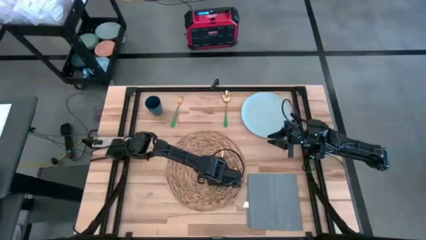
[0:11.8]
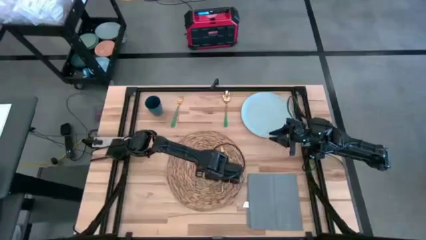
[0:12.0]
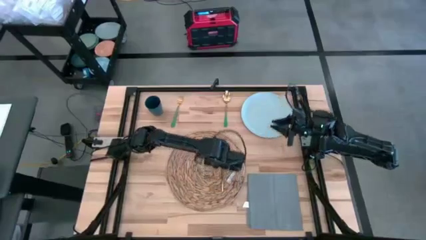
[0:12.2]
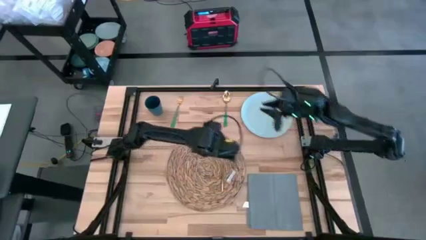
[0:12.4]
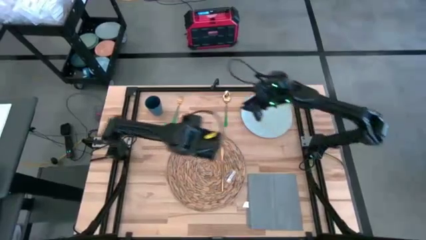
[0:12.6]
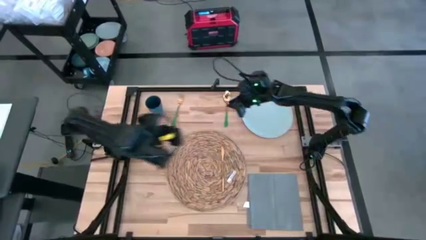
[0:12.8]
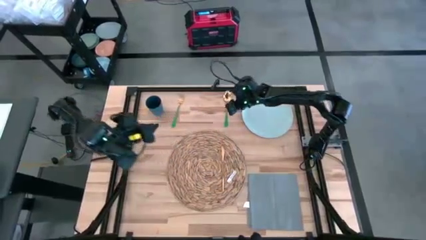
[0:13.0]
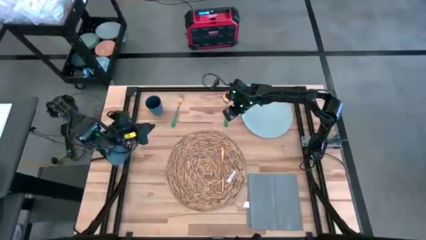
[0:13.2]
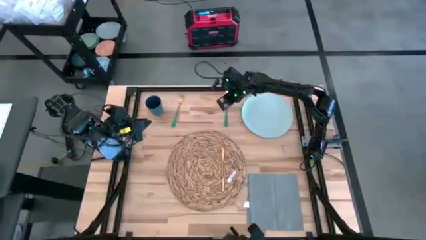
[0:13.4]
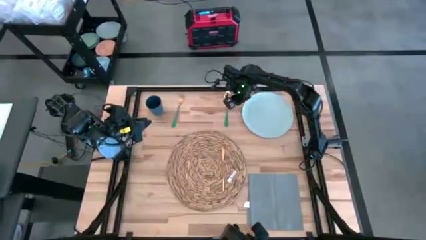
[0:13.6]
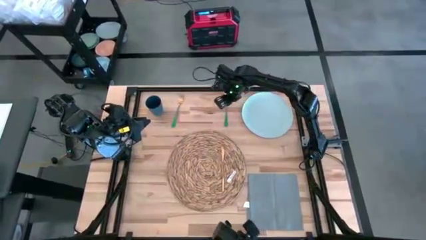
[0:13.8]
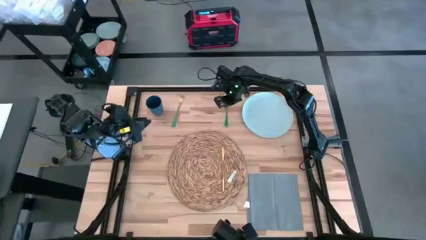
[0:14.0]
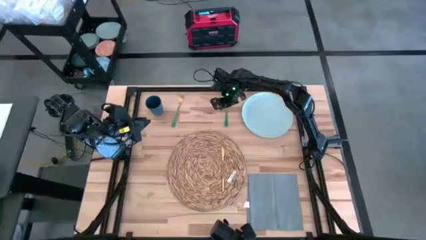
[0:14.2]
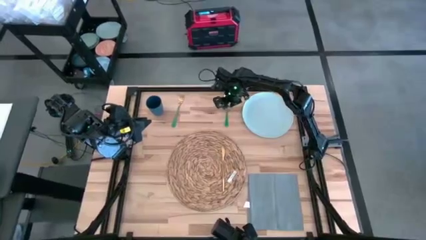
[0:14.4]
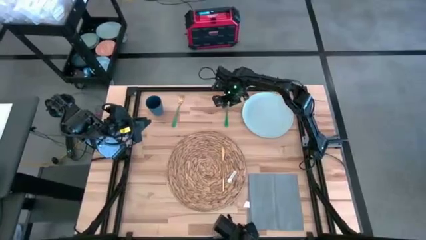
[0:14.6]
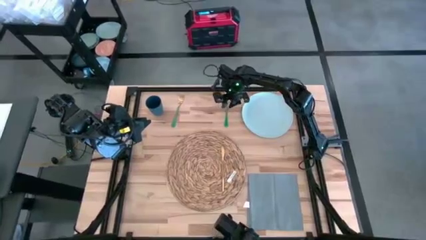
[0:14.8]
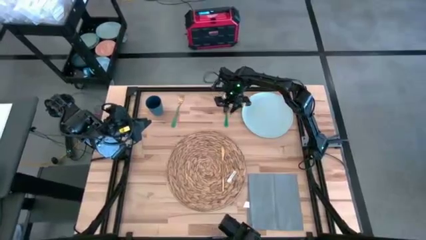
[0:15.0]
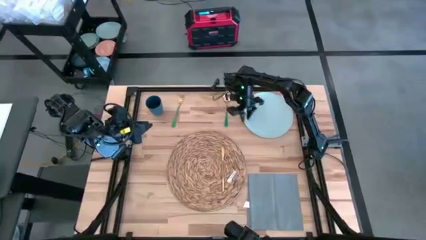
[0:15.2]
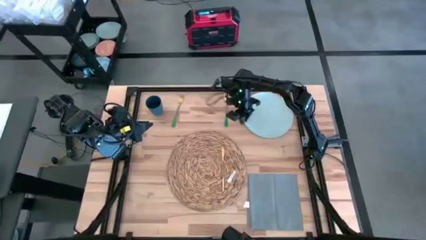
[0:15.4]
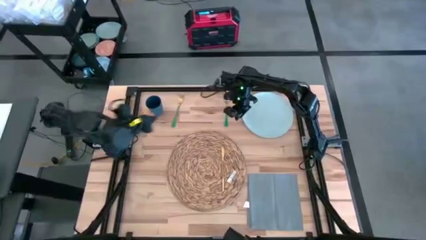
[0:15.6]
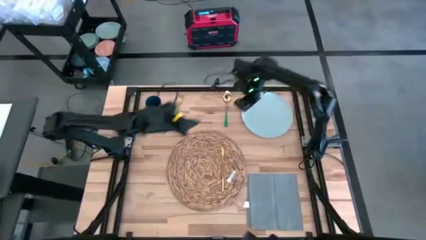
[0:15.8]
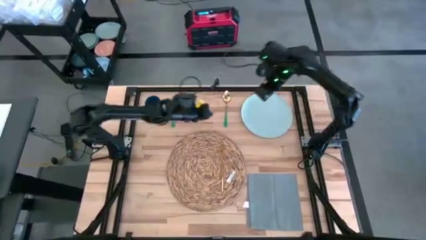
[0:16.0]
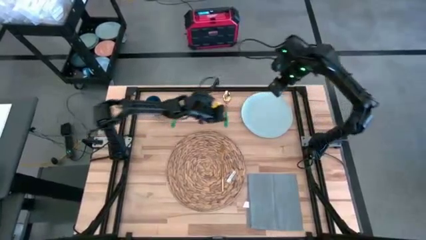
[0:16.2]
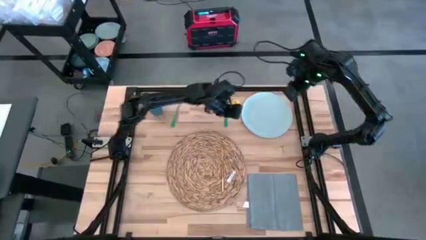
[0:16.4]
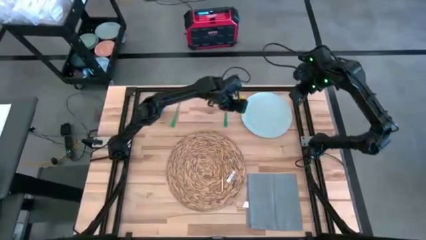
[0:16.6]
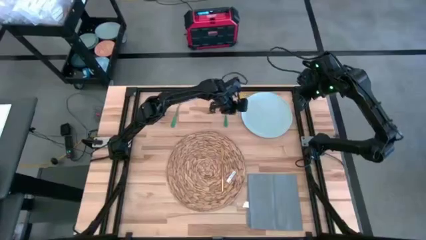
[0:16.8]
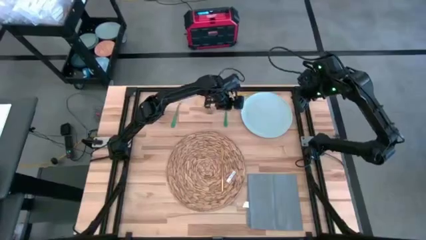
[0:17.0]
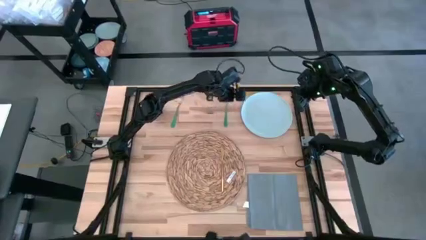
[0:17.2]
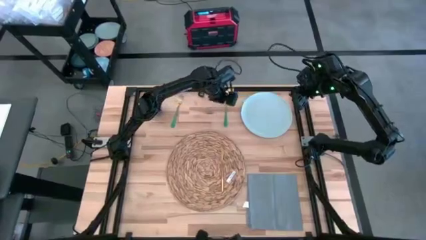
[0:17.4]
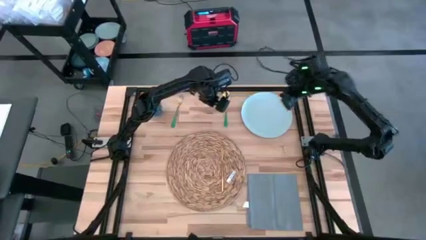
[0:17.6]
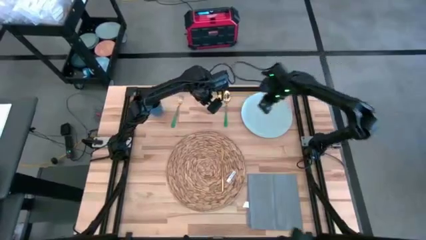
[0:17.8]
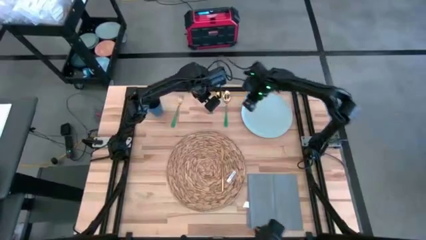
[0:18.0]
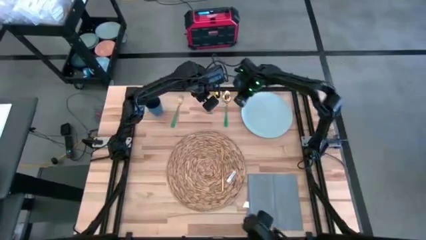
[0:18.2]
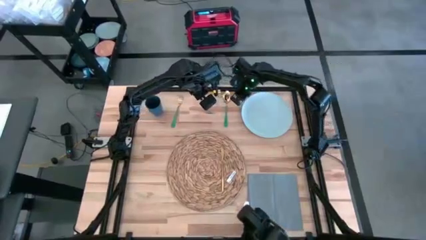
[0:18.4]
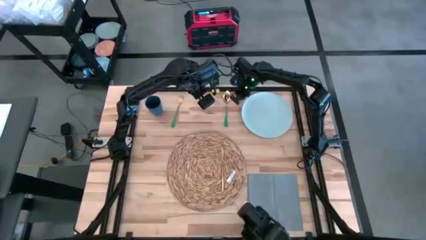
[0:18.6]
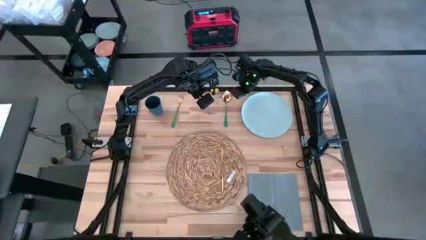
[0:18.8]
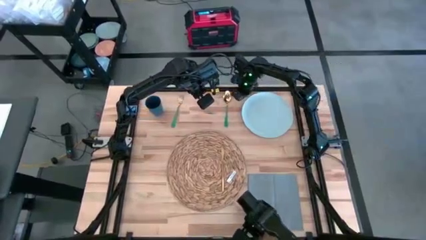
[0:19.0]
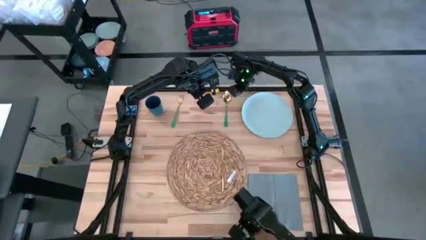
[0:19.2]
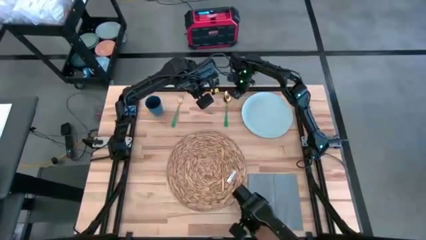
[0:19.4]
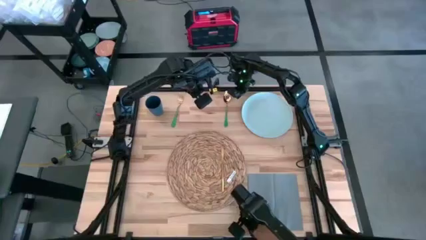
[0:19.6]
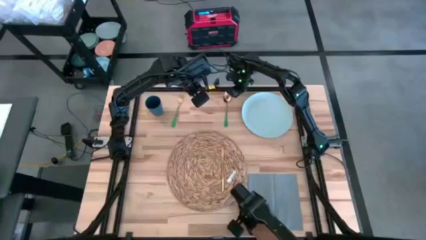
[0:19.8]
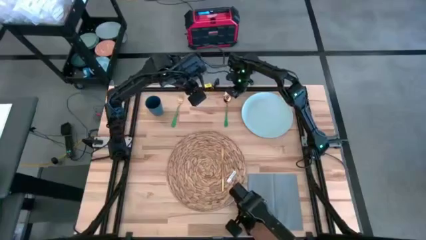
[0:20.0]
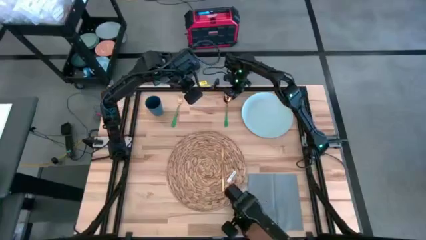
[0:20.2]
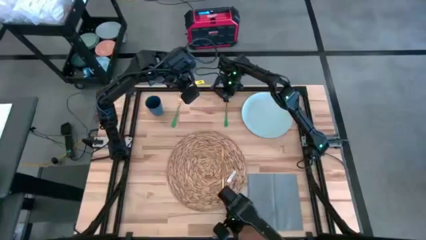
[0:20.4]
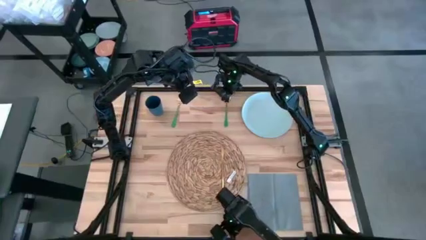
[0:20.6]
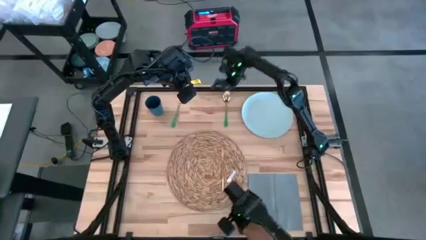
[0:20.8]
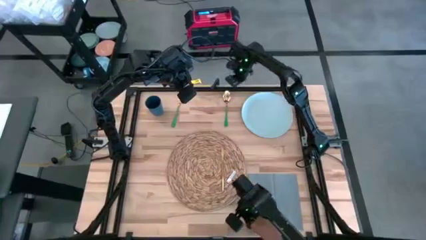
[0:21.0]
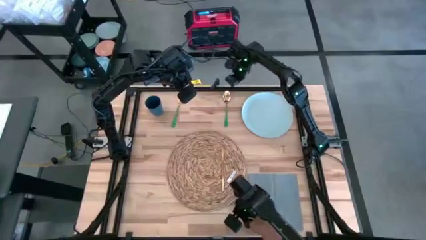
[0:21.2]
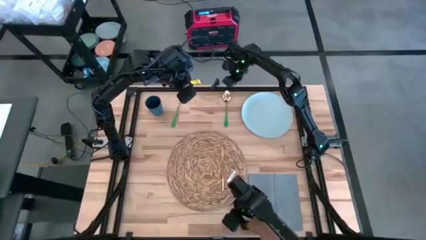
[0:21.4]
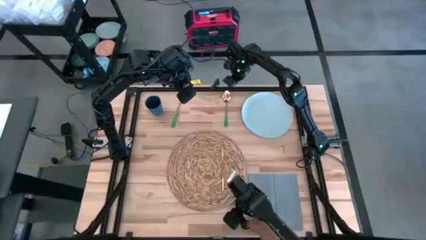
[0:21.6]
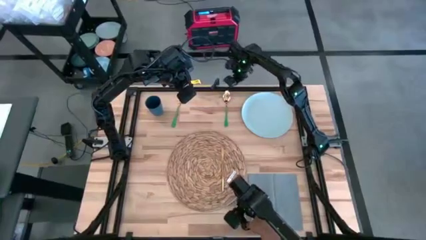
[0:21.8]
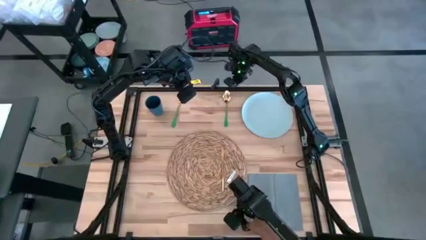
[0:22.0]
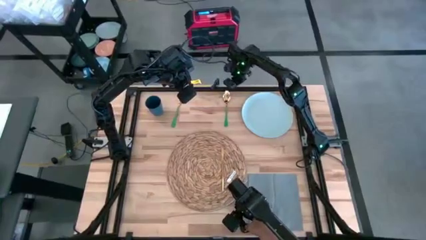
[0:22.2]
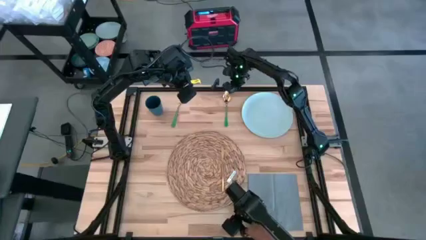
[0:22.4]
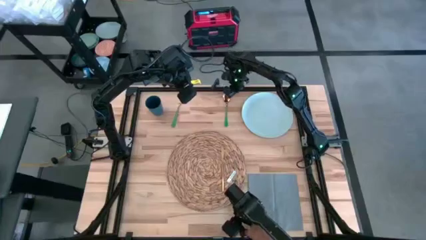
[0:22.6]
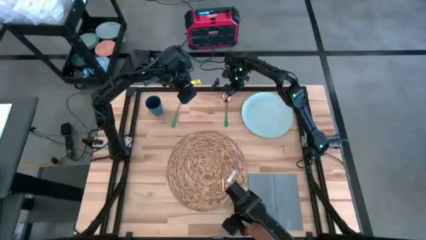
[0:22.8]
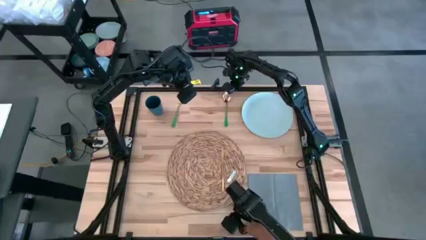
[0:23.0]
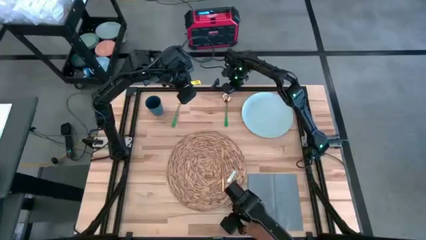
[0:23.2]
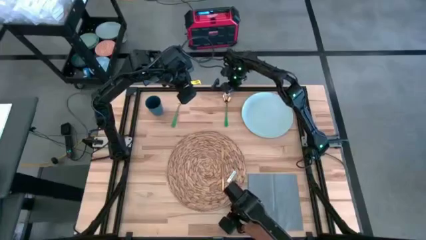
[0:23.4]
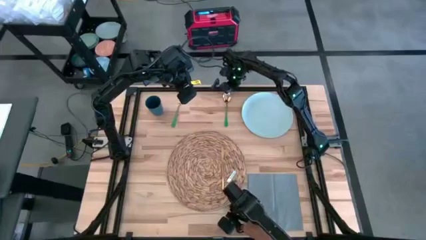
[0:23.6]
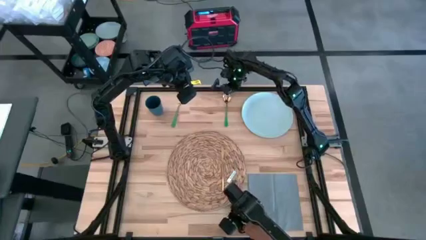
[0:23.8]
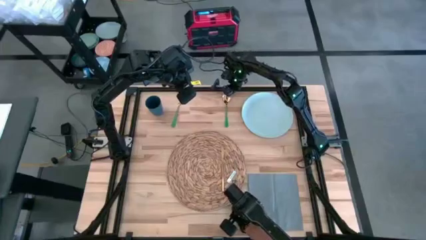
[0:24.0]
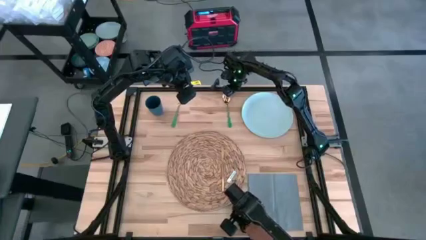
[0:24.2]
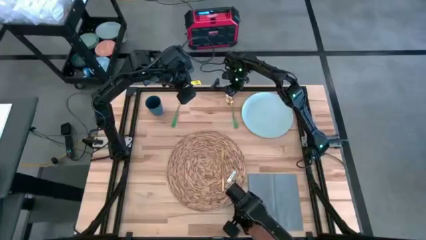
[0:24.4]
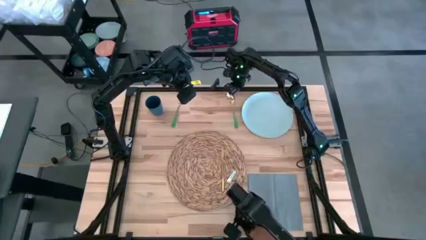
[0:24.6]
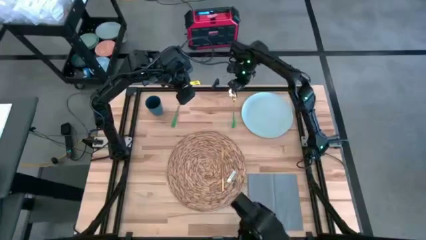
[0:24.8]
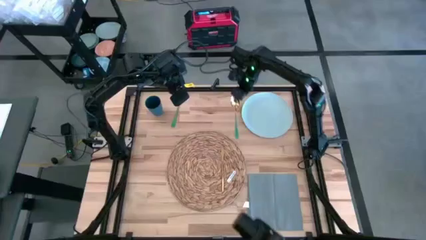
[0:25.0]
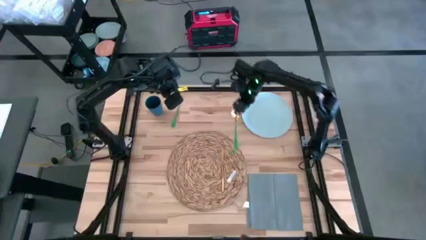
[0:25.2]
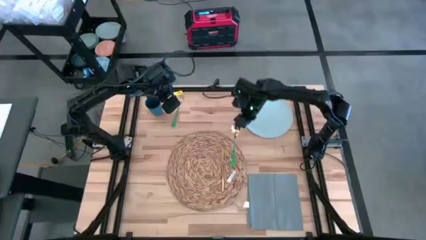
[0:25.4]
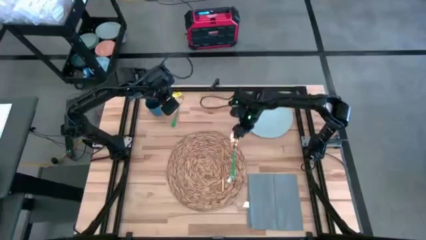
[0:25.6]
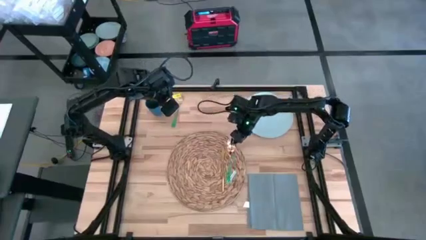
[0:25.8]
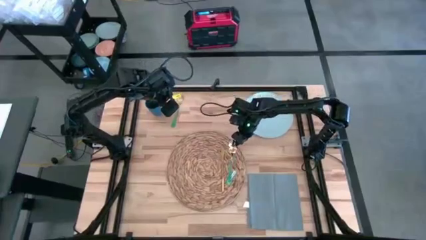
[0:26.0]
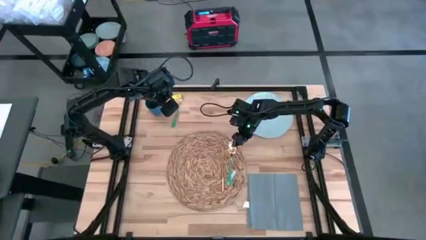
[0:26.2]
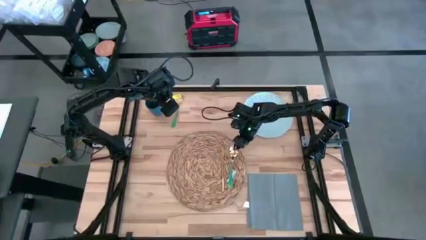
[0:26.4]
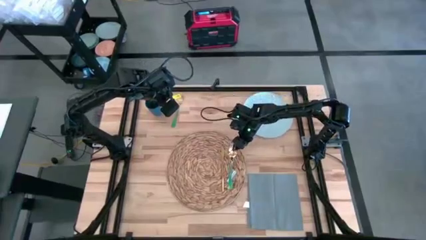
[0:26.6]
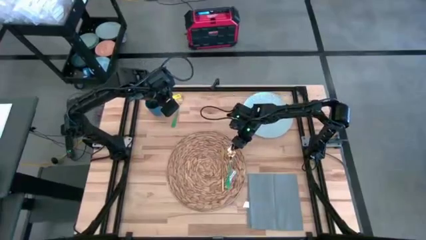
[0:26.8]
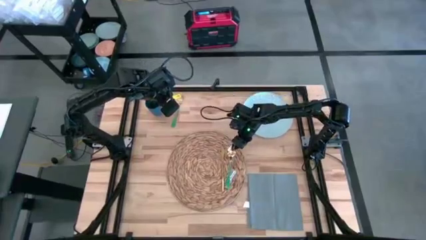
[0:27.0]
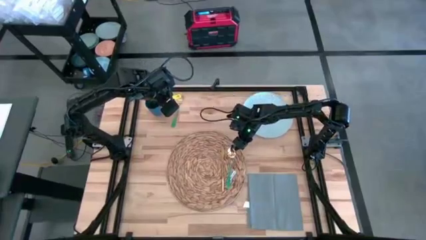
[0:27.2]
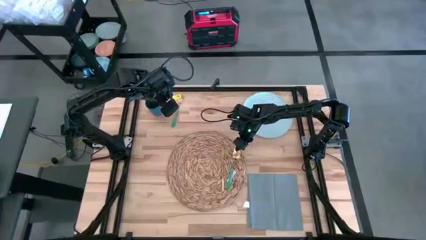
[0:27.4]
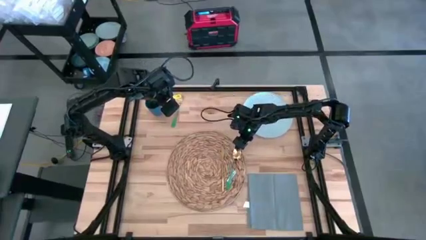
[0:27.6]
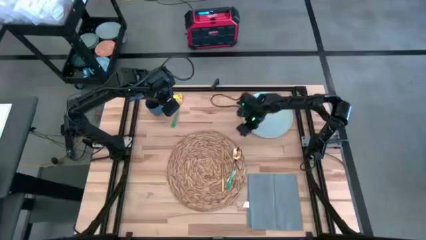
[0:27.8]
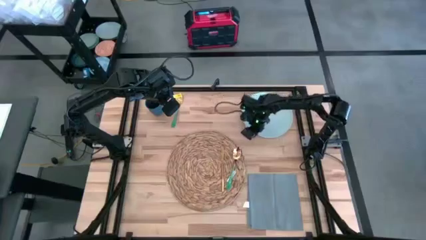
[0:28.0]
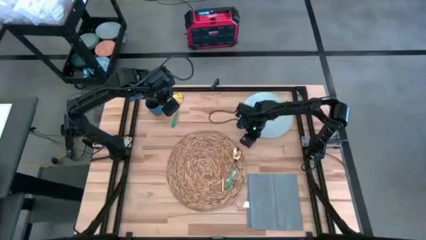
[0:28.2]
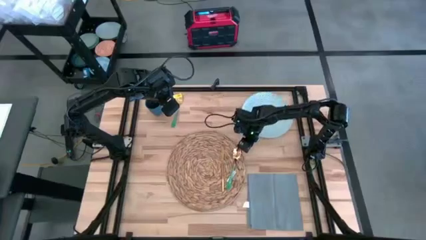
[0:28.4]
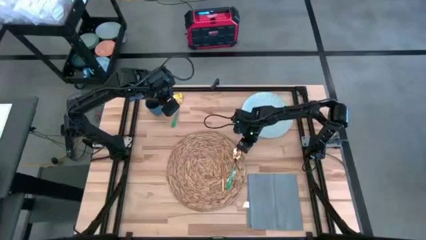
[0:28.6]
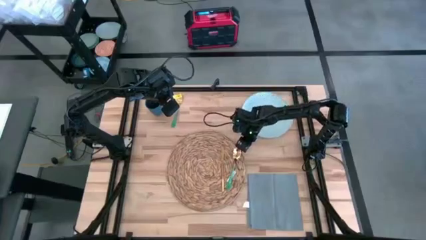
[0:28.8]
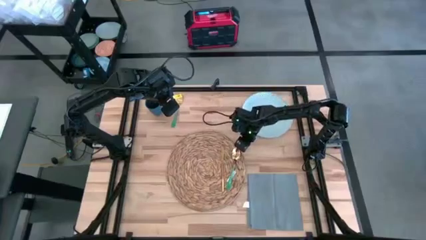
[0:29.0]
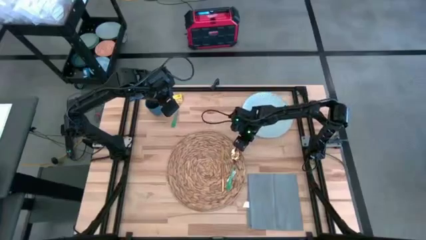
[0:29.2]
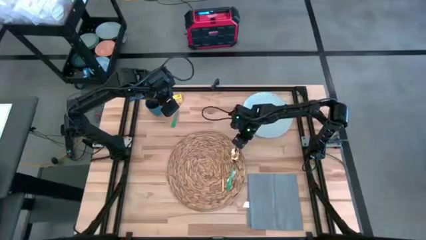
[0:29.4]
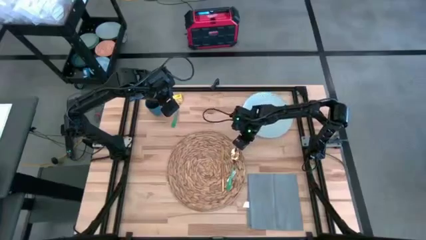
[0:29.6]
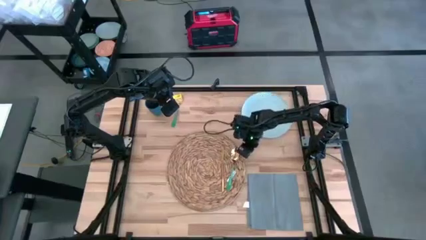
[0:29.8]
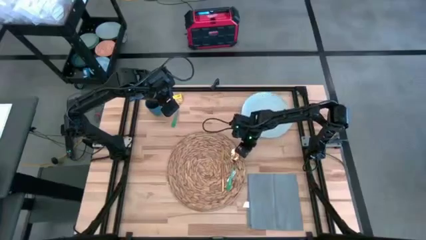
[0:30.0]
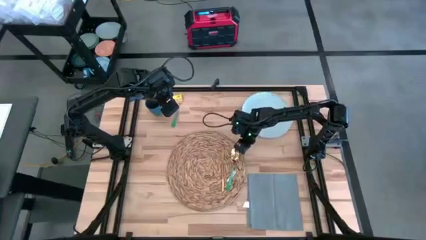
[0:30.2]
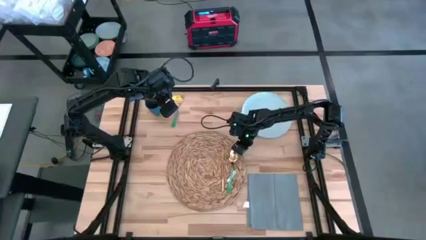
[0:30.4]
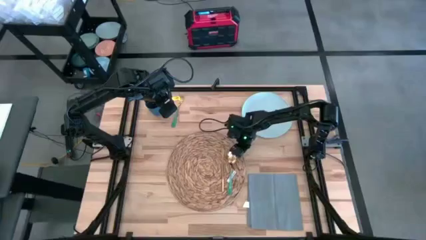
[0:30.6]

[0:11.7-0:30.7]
Task: Set table place
Put the green spoon on the brown placemat to the right of the gold table knife
